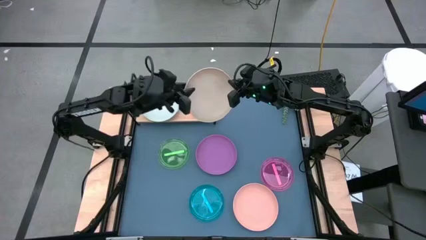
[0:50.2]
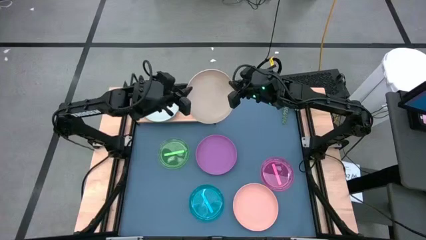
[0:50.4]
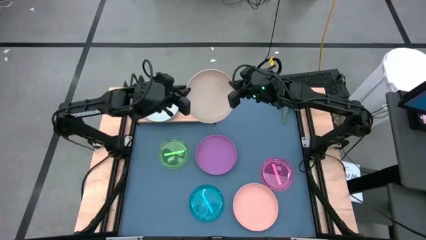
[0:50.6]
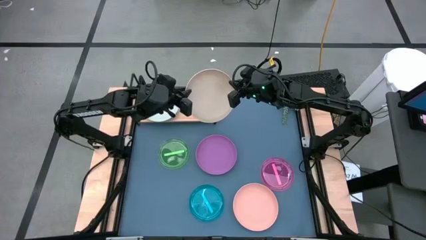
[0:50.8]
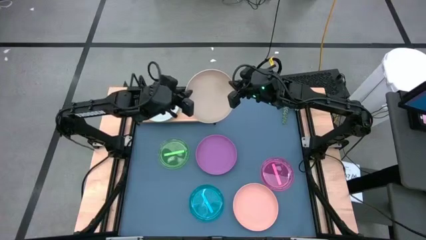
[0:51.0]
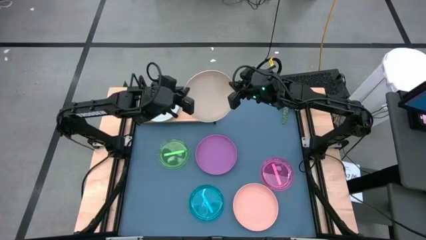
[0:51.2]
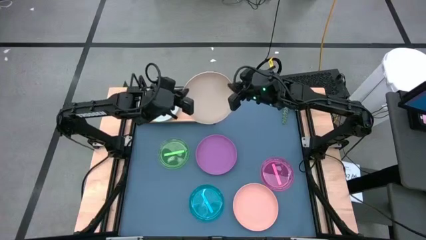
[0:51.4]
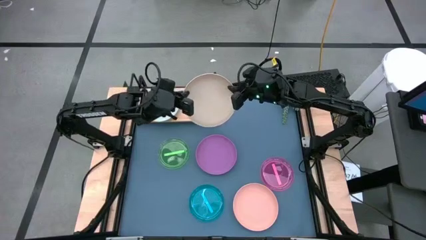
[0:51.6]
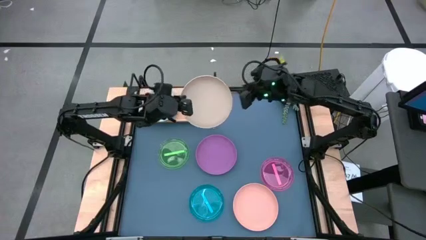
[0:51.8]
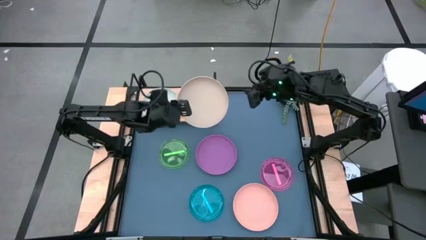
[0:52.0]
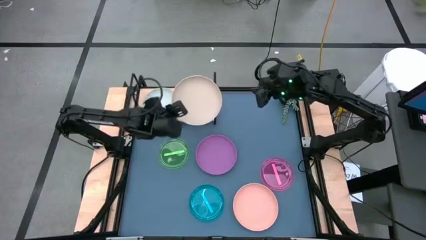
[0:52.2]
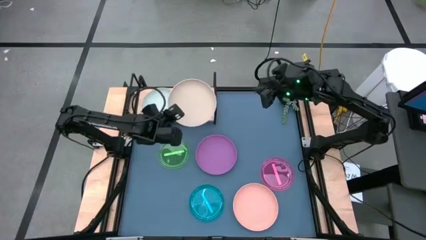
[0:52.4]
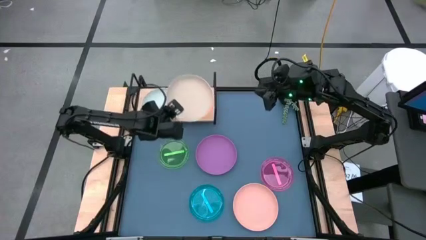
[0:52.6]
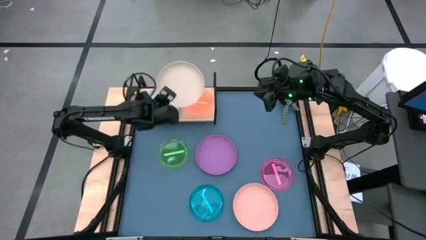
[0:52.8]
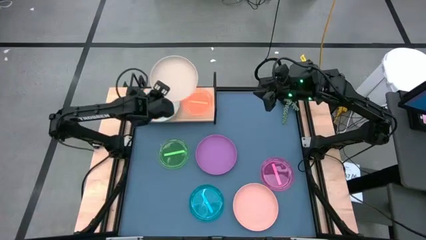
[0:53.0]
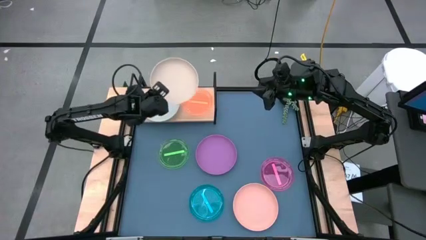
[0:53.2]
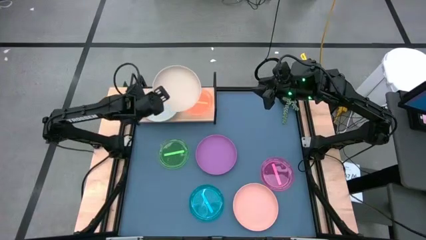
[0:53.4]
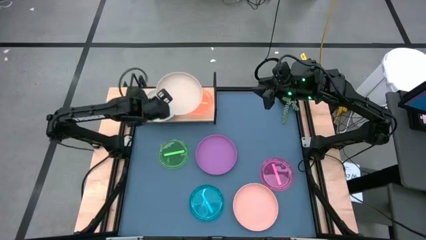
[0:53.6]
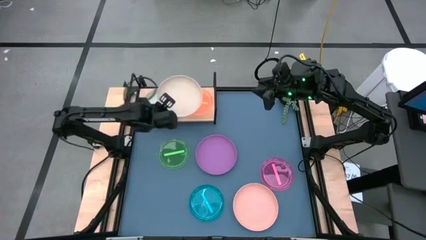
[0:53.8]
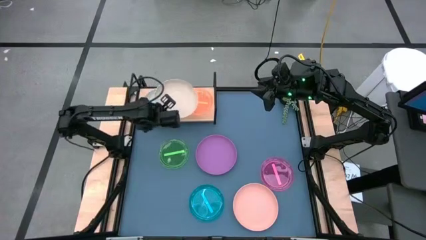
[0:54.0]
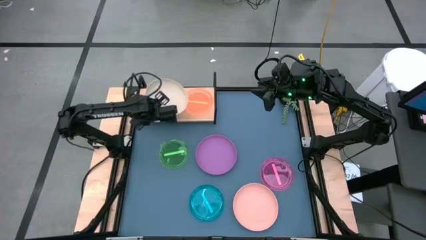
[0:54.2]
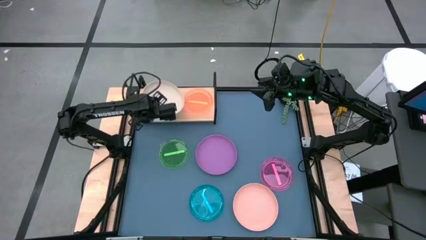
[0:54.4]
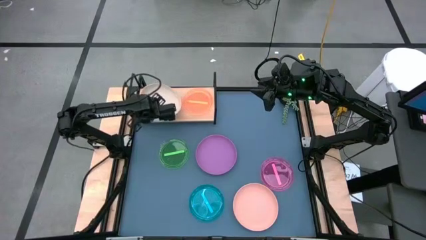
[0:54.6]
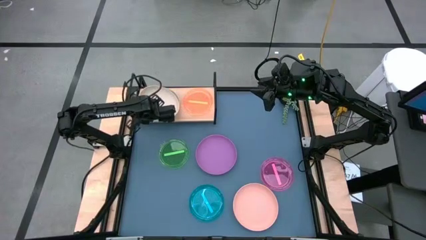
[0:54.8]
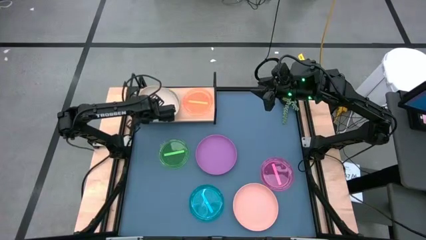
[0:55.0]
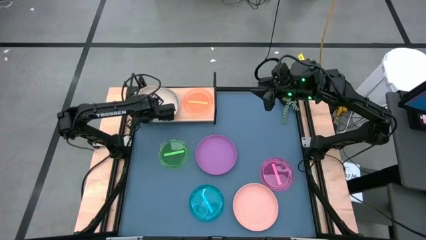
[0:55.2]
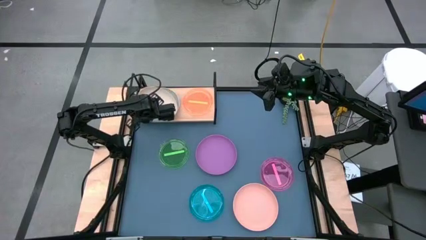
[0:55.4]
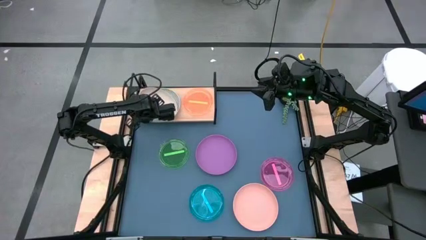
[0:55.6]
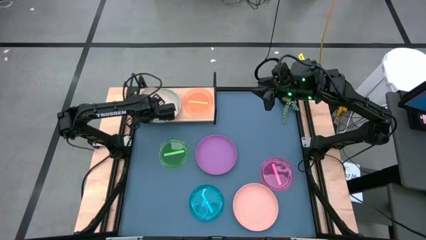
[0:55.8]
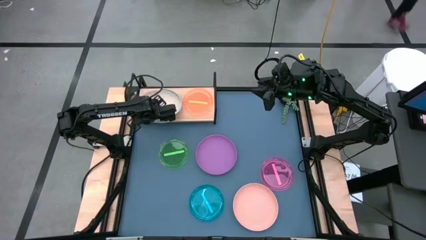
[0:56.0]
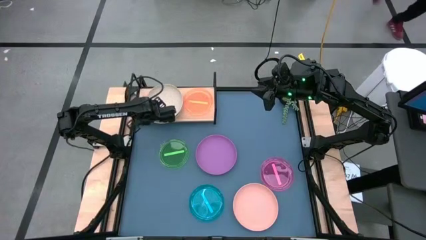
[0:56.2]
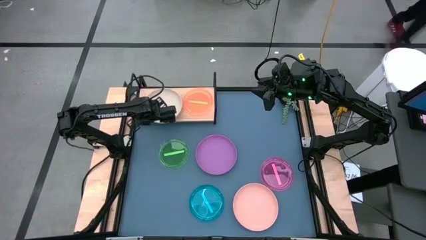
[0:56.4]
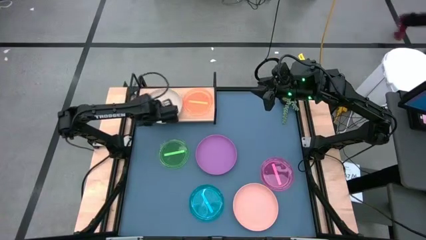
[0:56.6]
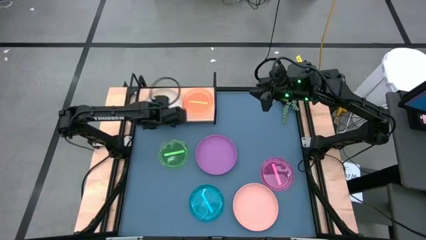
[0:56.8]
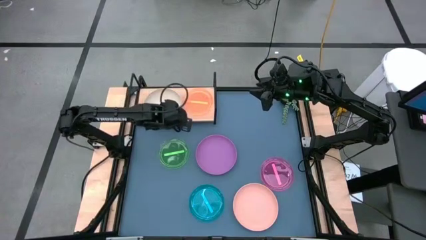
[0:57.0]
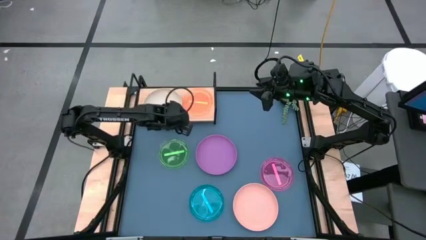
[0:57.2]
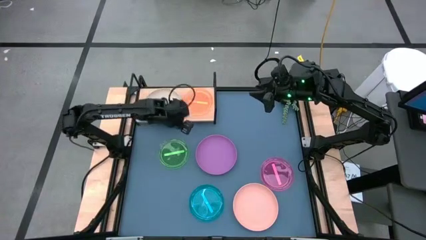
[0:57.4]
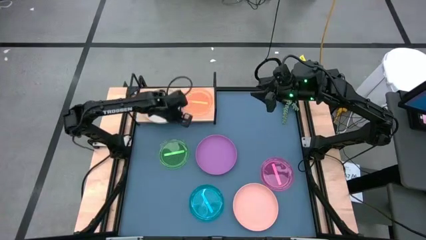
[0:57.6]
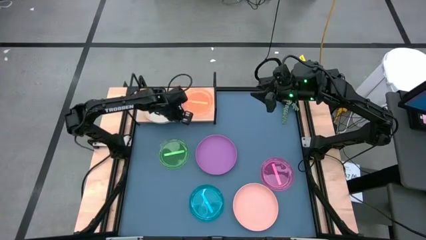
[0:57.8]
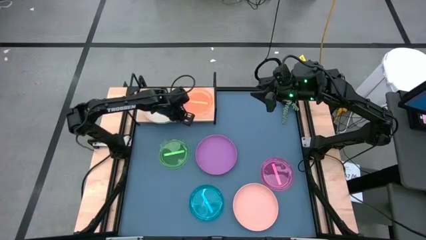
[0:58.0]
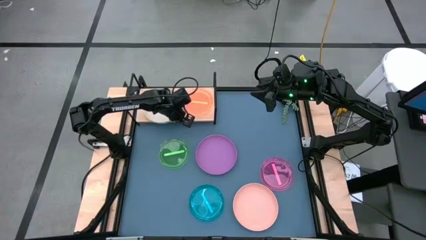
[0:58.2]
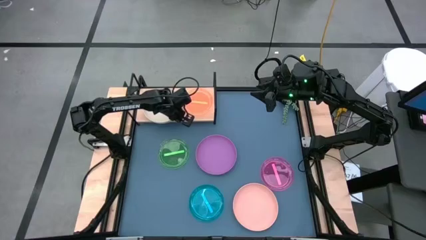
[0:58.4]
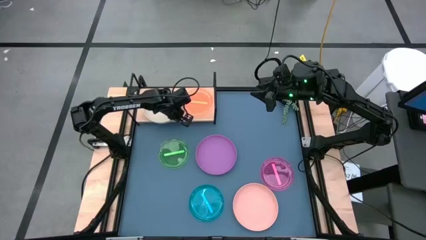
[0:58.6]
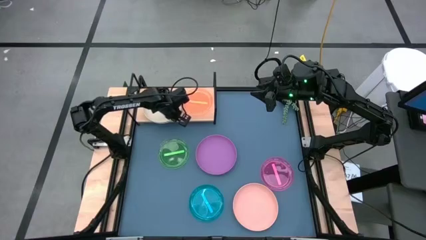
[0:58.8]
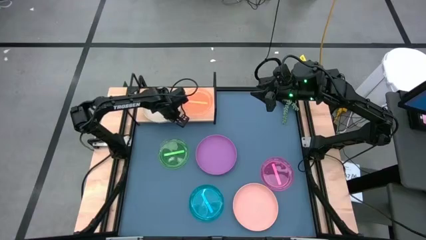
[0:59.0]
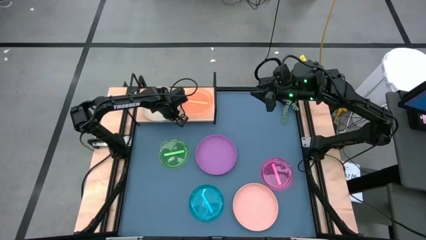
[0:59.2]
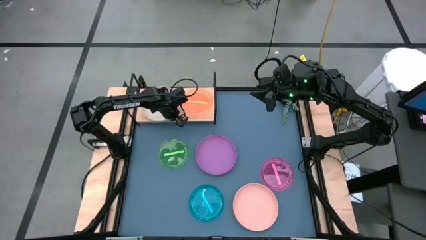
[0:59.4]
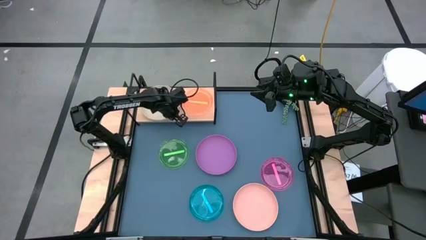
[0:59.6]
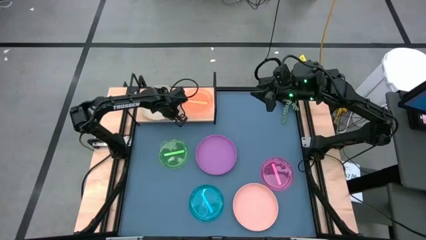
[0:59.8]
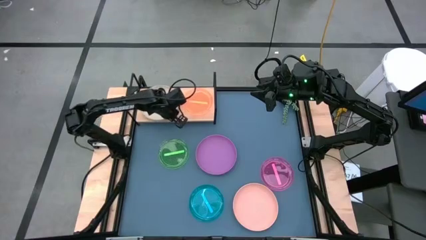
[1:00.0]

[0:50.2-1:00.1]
Task: Place and stack plates onto a shelf
Stack the white plate on top of the gray plate on the shelf

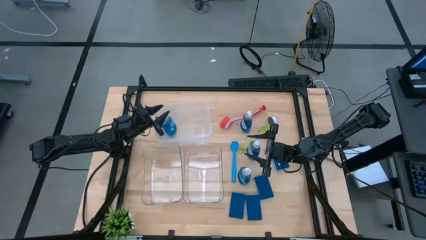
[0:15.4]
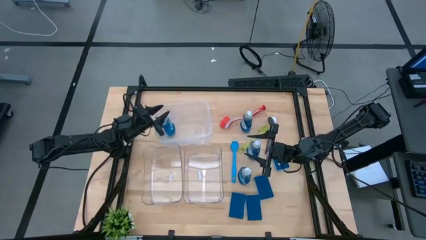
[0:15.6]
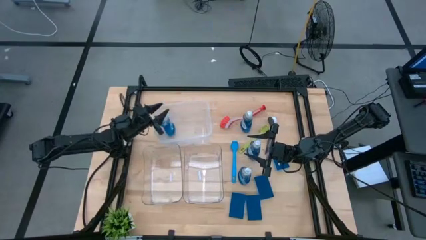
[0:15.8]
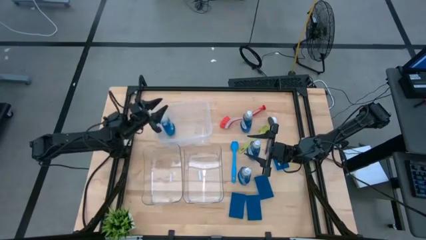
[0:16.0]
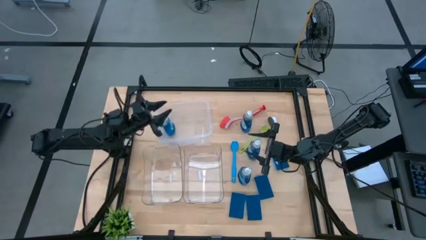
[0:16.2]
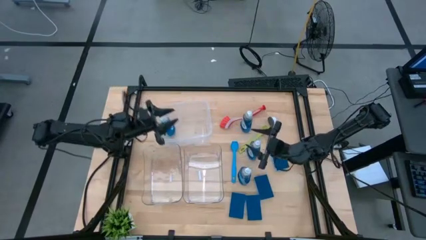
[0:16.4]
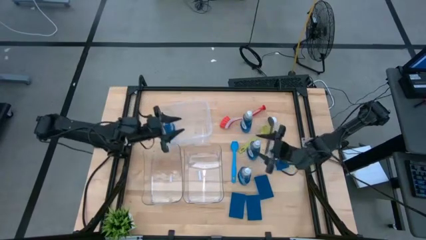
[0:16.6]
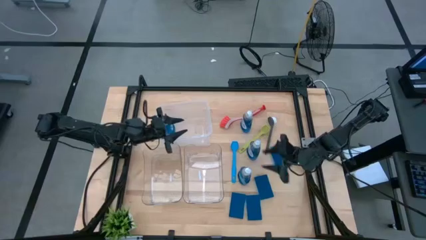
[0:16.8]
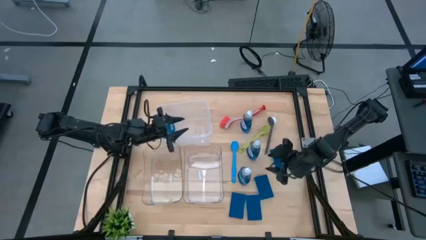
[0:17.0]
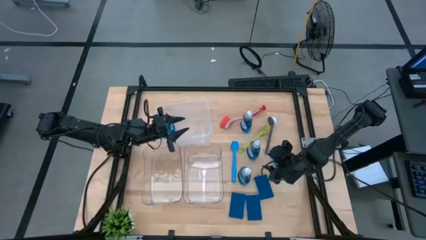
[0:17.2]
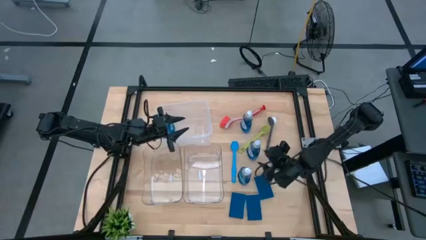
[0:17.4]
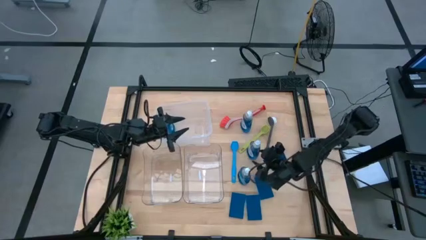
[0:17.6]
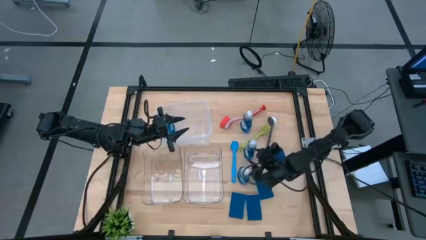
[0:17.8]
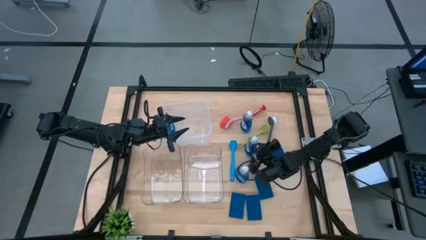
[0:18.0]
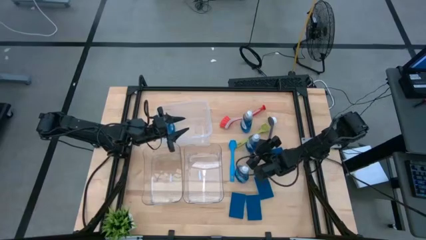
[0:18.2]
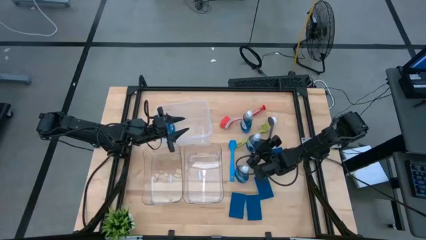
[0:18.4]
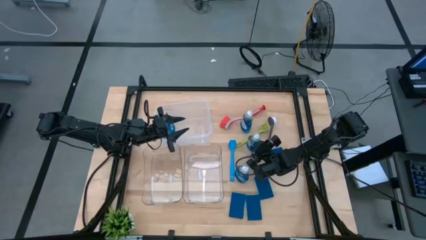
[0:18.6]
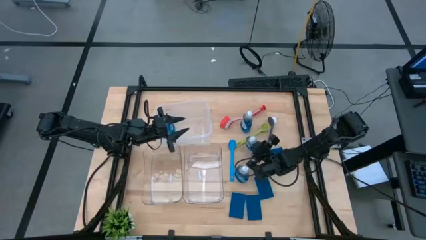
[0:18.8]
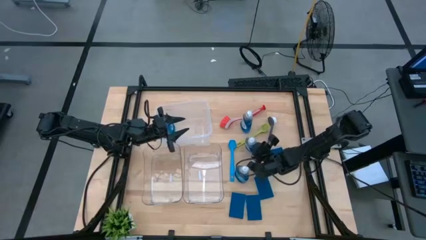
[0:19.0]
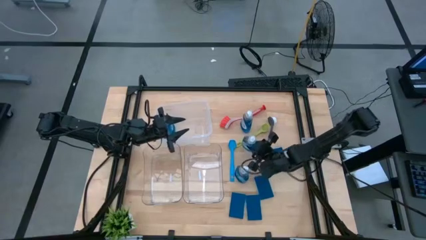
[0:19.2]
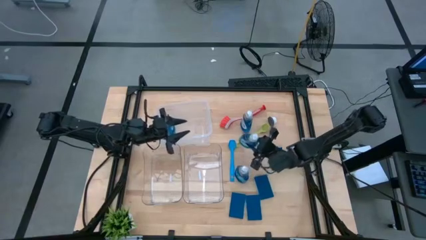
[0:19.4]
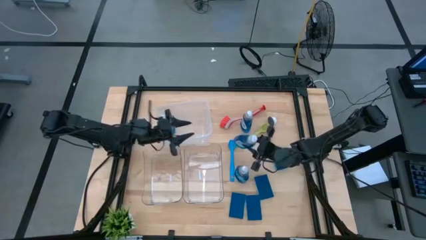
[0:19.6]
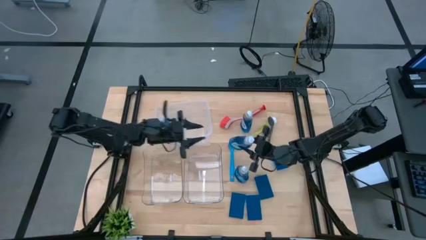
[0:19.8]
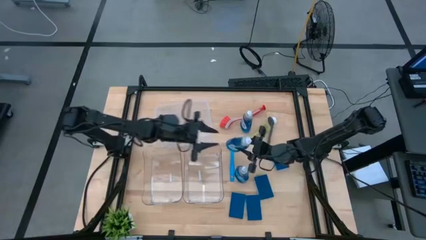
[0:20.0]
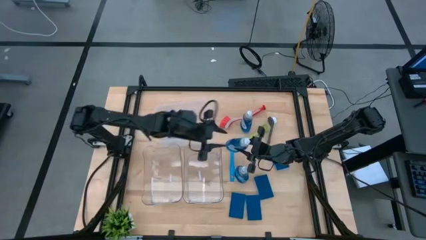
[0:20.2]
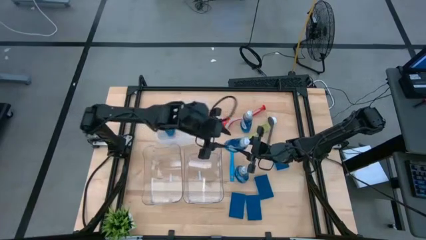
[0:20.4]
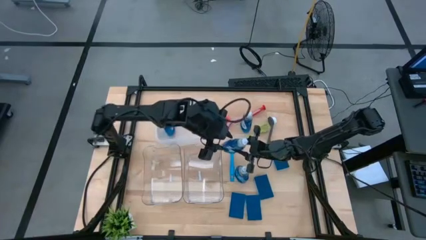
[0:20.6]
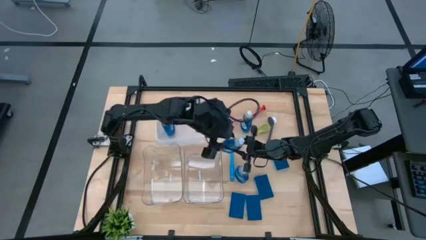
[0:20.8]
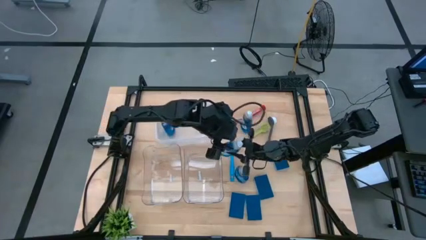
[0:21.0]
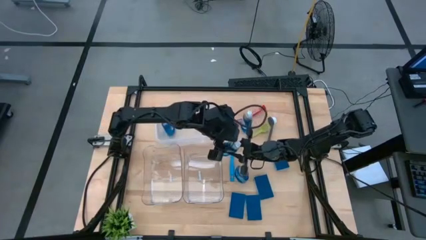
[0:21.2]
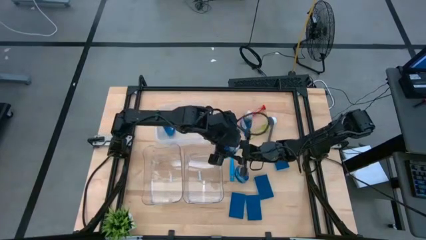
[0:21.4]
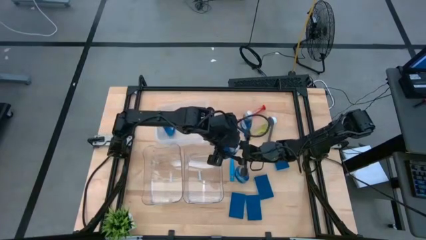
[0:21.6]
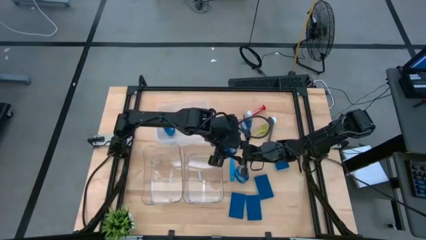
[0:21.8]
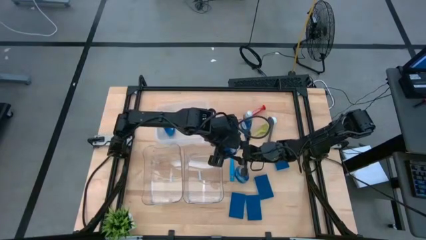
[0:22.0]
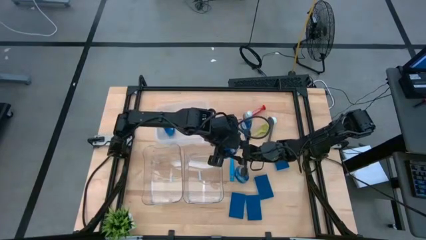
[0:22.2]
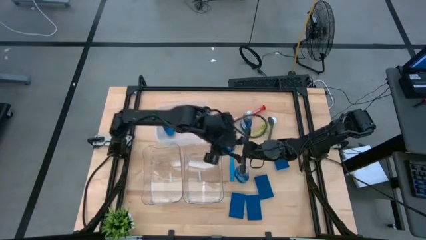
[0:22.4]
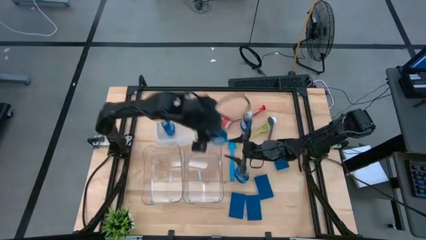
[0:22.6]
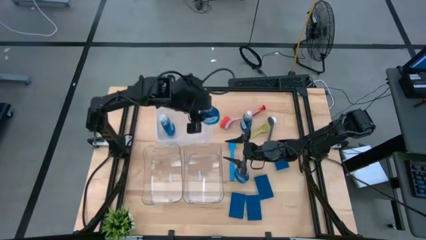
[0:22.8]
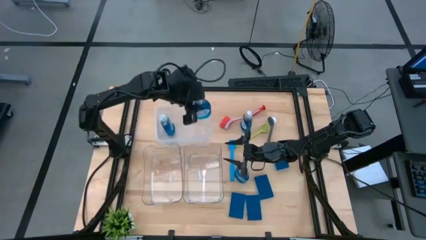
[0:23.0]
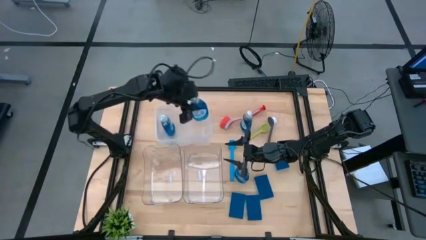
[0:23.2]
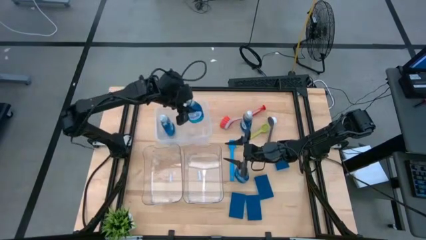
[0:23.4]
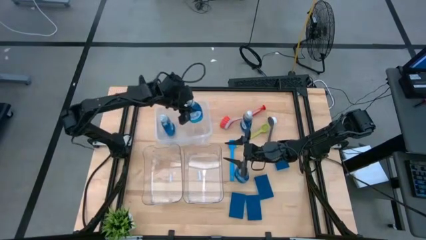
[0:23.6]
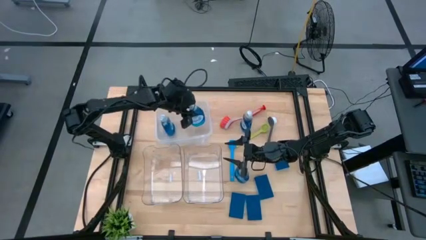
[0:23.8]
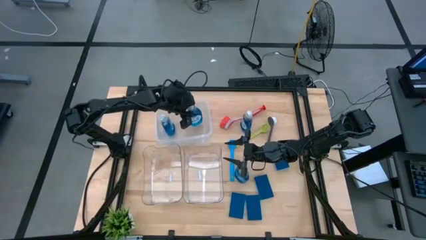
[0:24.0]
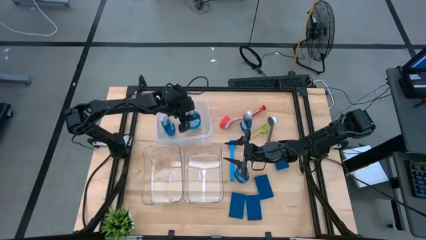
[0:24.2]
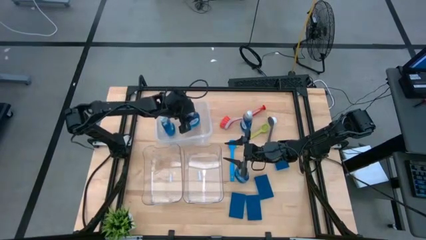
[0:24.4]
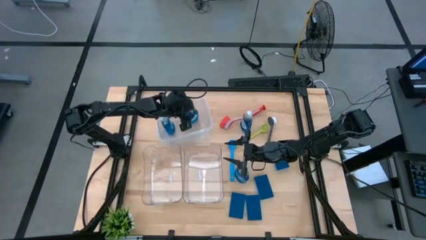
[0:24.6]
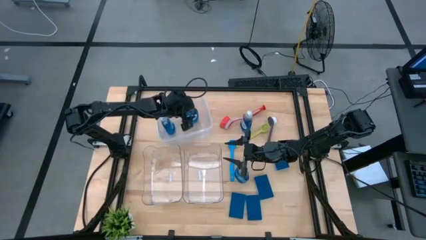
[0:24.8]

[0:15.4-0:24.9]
Task: Pick & Place Kitchen Sink Supplies
Put the blue dishwashing liquid bottle into the white transparent bin
